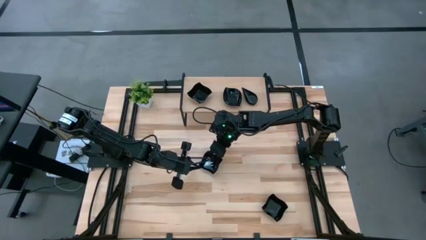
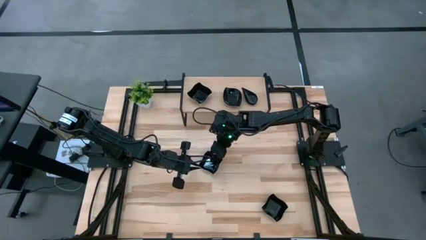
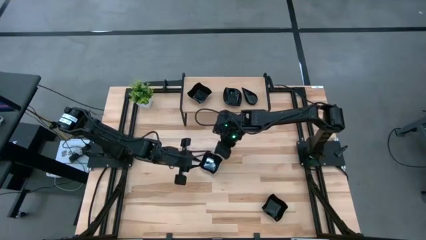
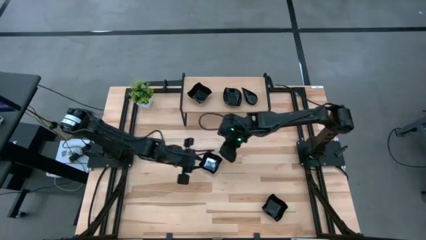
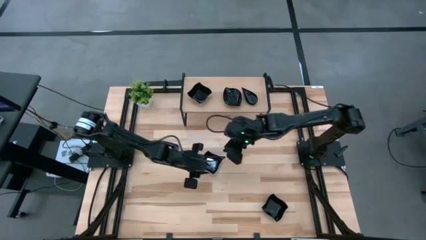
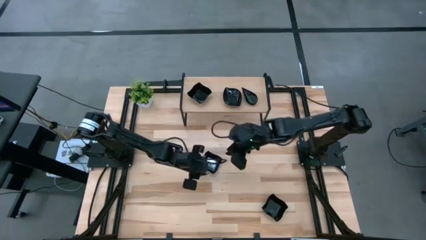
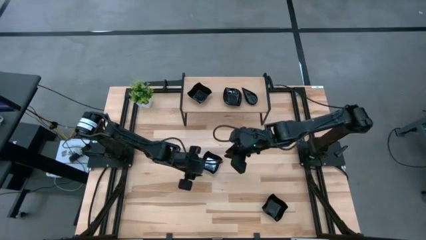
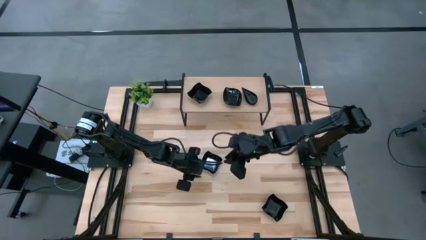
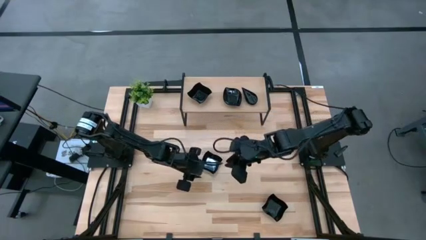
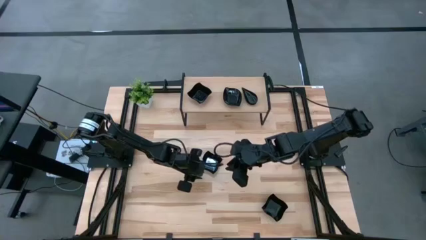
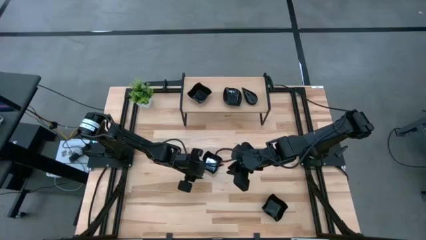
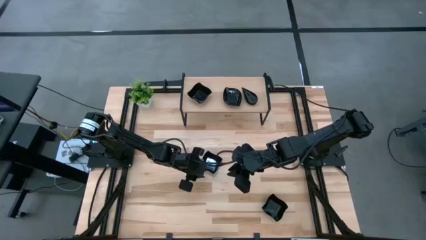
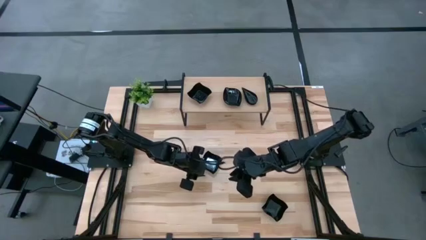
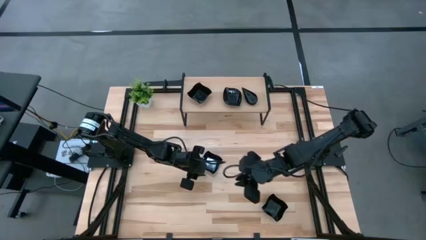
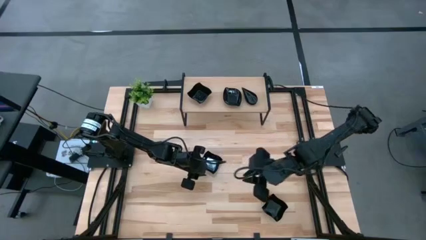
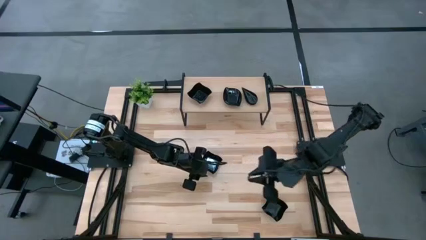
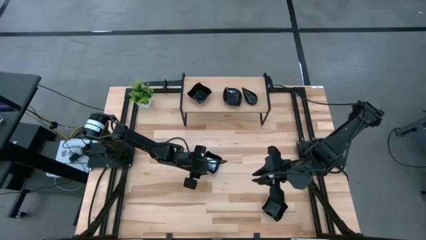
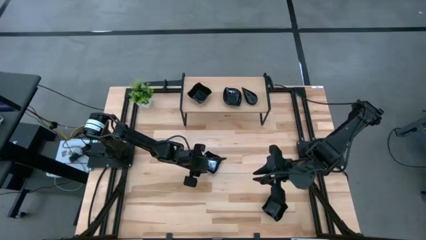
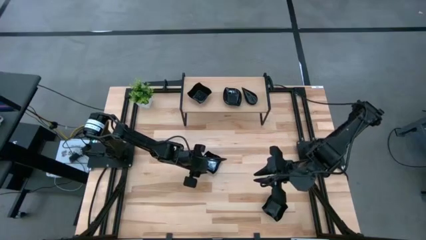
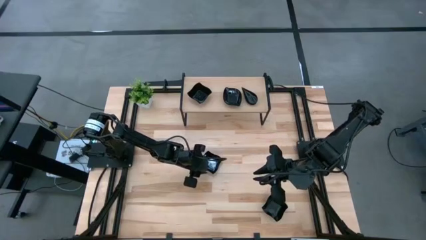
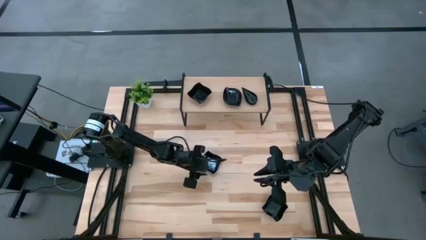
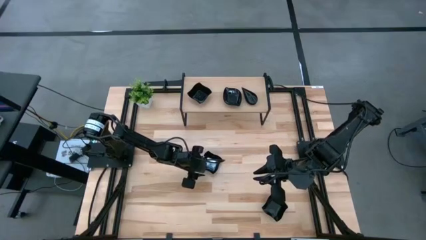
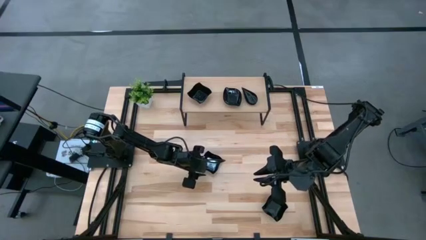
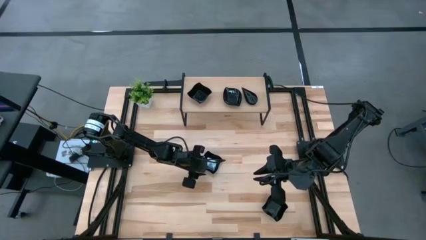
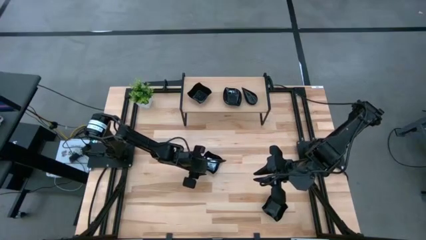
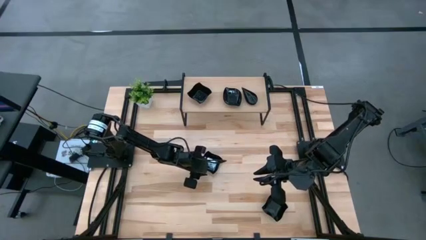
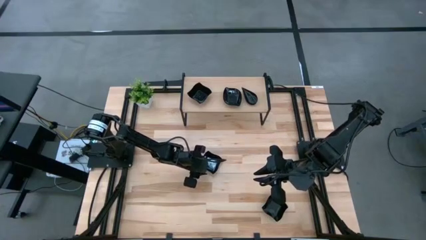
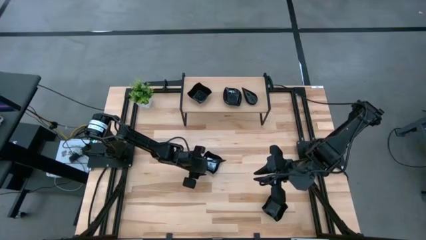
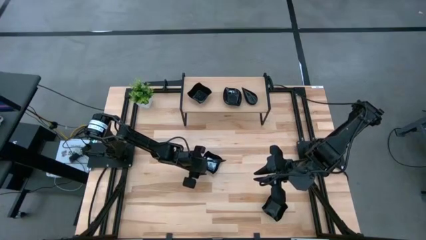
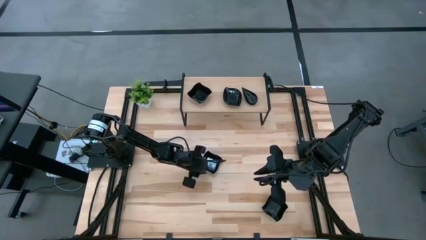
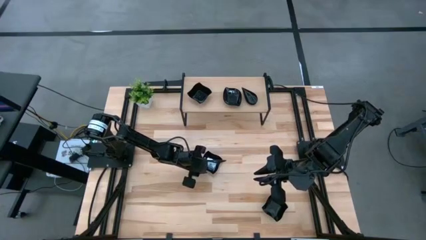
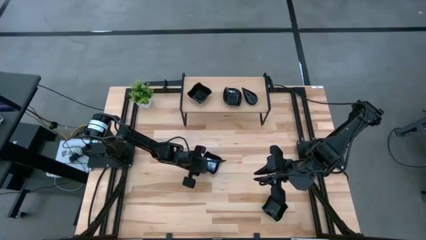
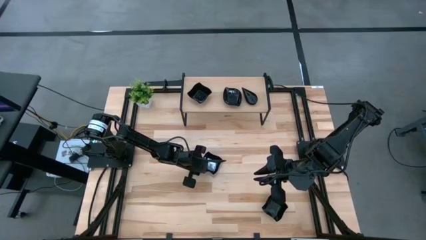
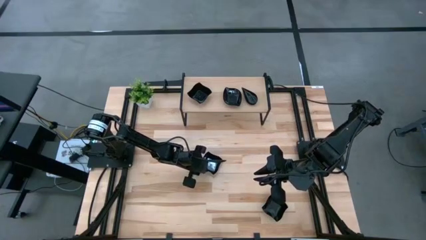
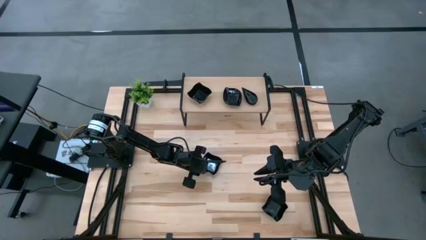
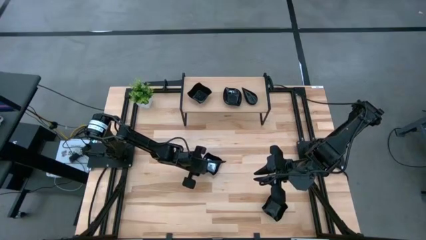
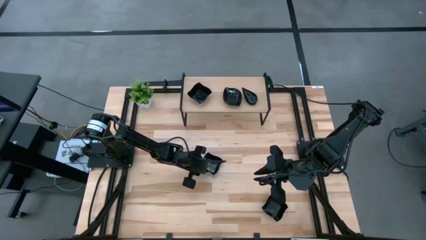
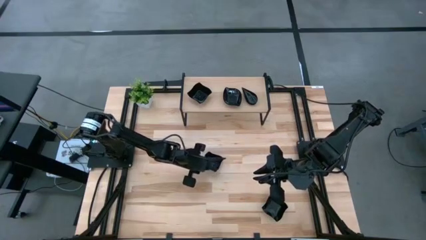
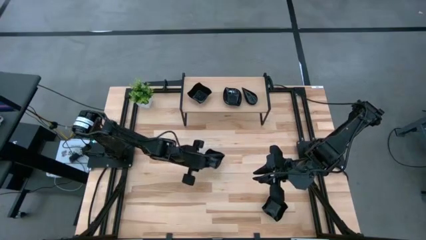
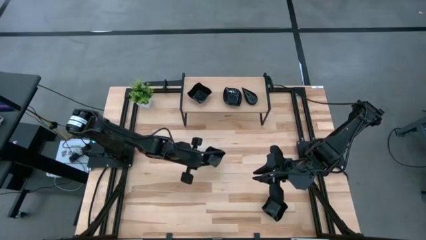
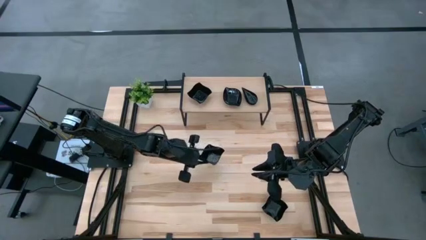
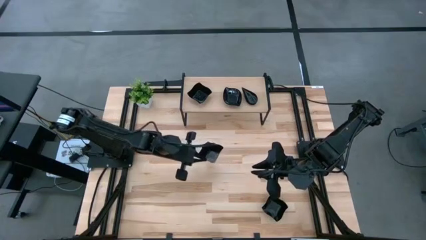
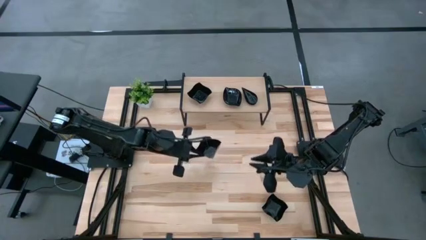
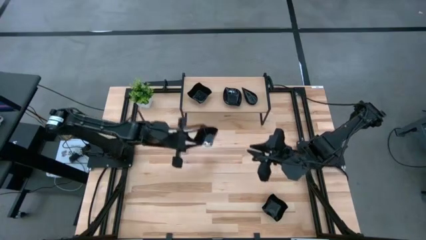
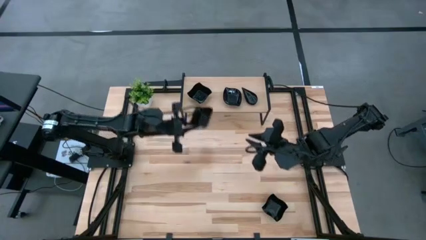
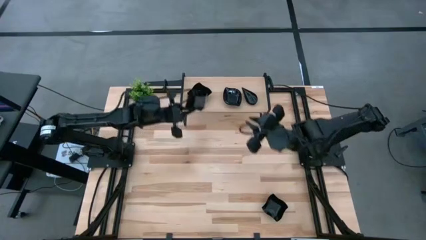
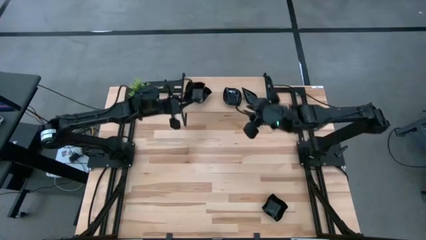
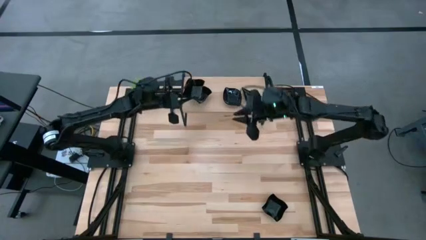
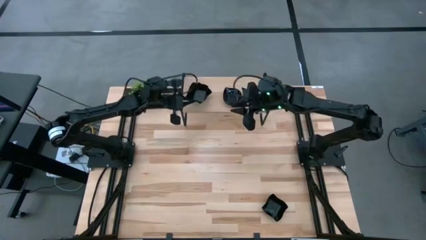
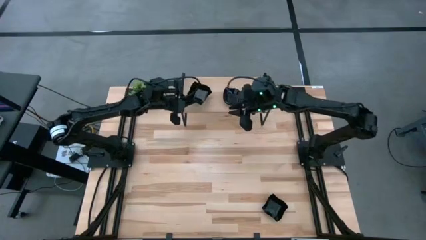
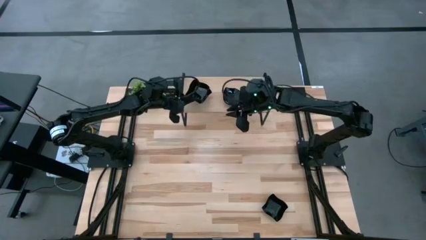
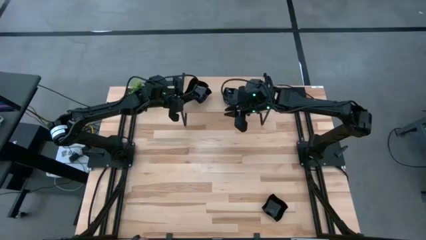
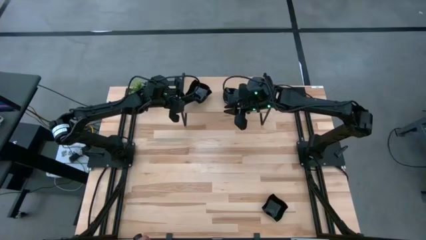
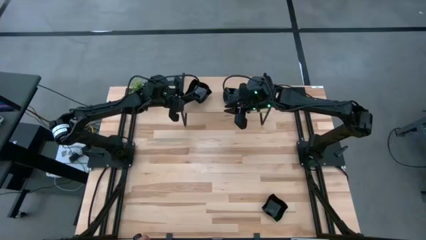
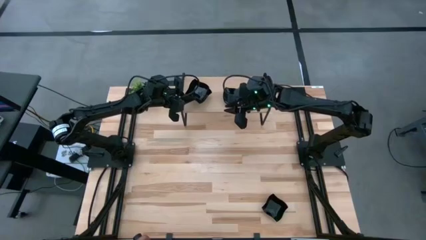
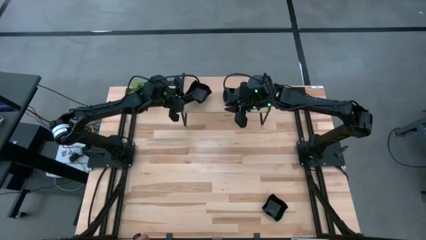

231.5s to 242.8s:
Task: Pick & Place Mini shaped plates
Stack the black wave square shaped plate on top of the black wave square shaped plate on the shelf
